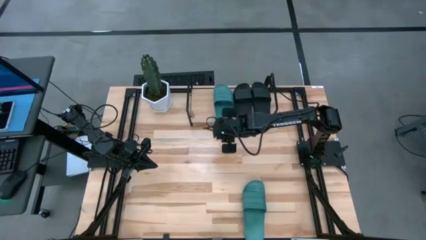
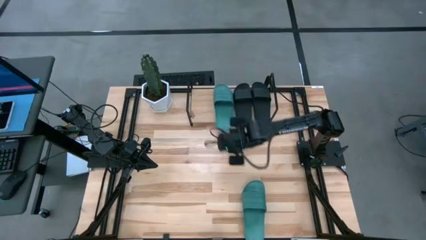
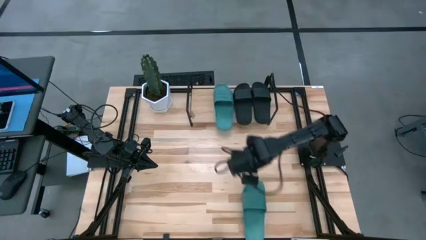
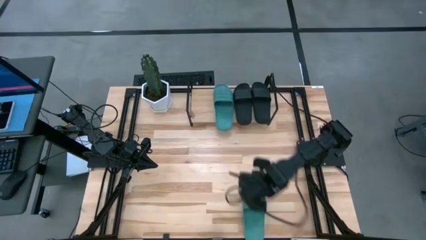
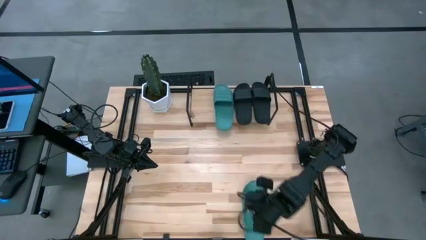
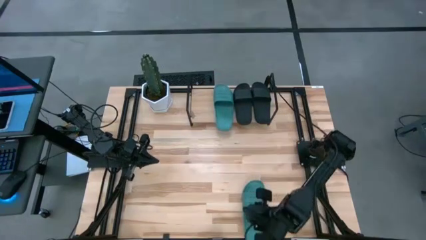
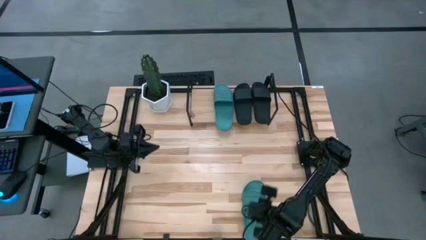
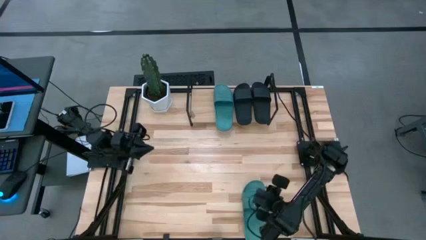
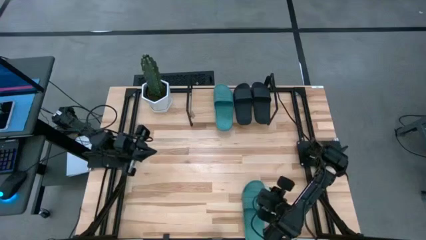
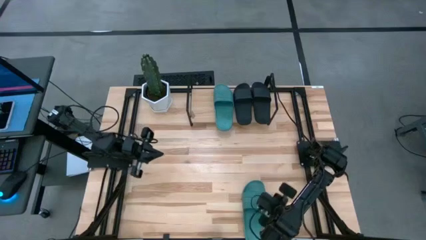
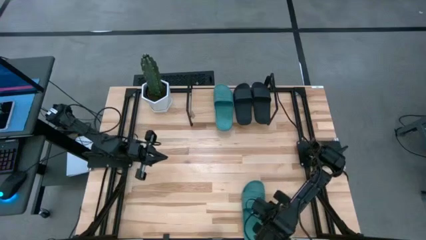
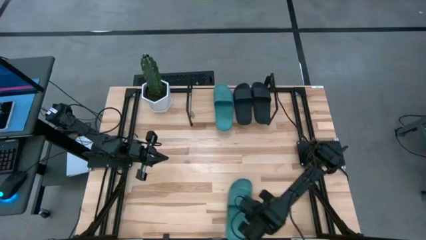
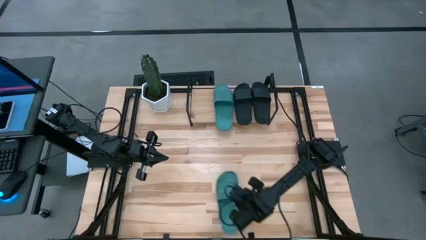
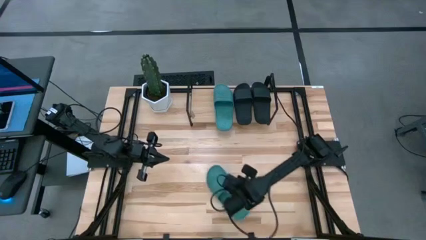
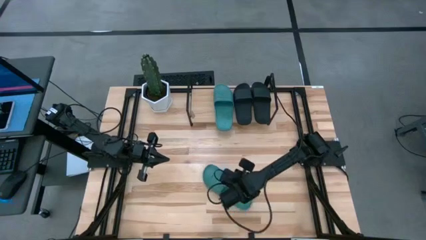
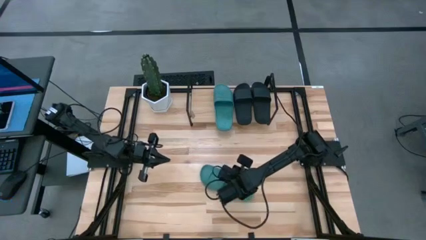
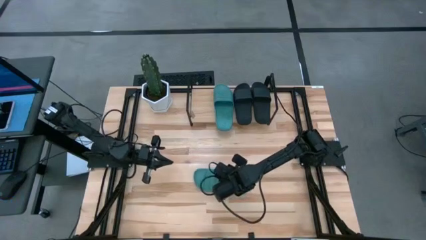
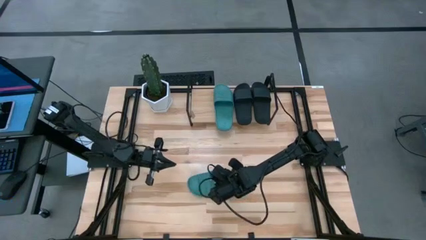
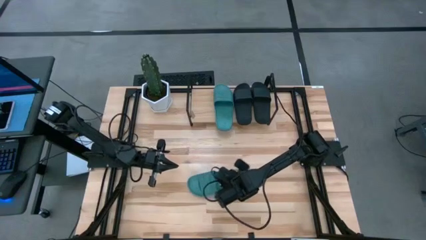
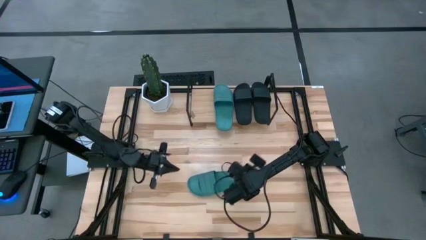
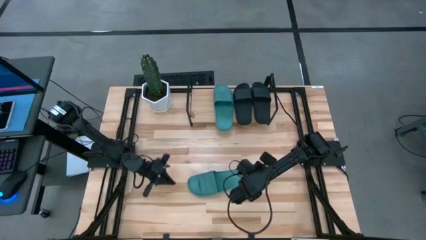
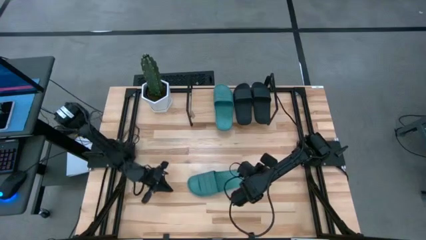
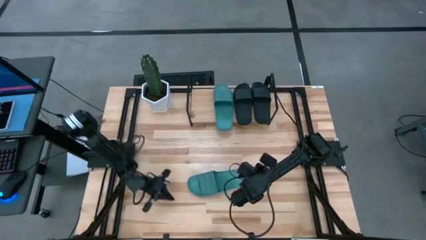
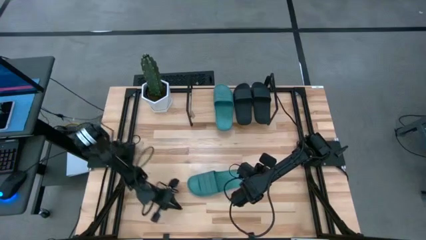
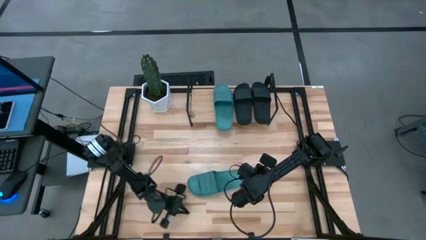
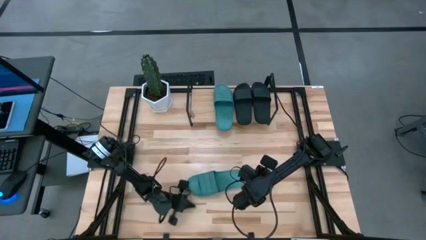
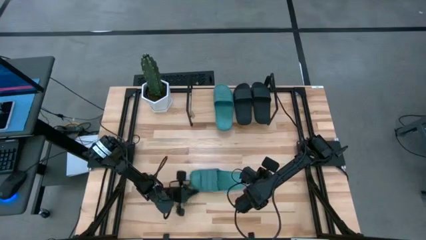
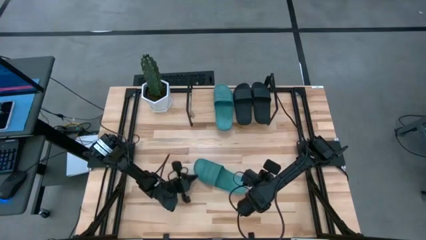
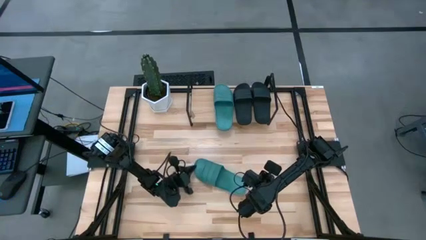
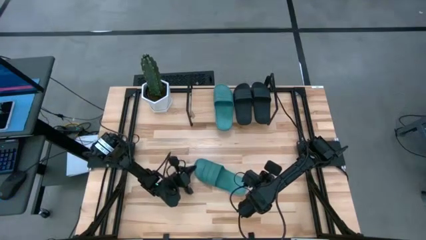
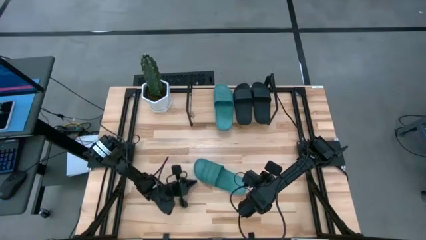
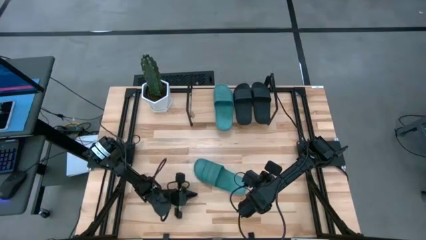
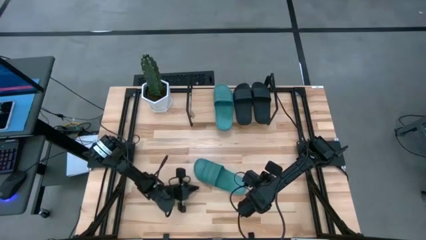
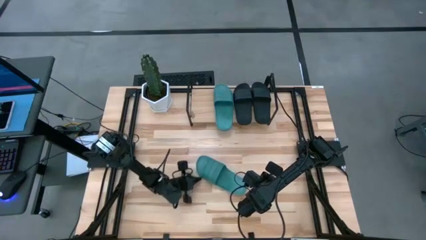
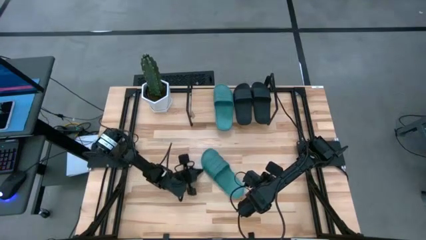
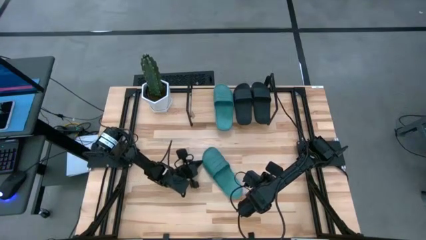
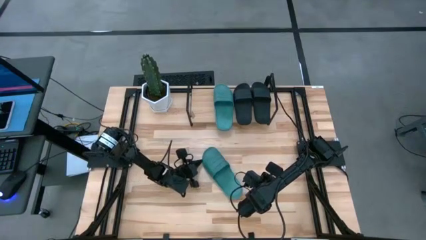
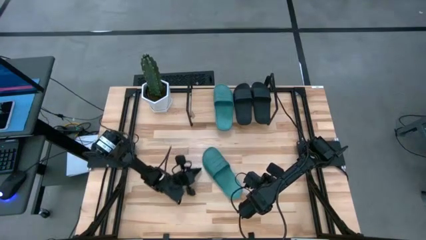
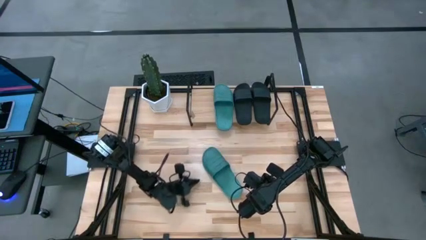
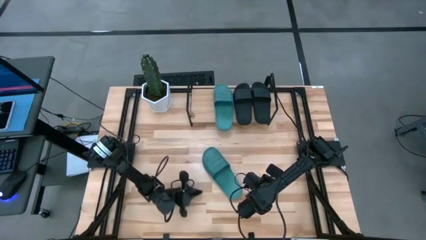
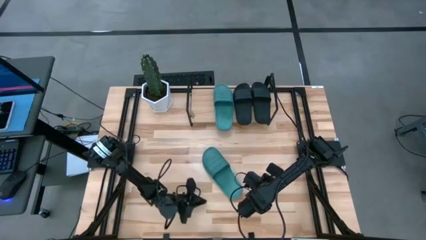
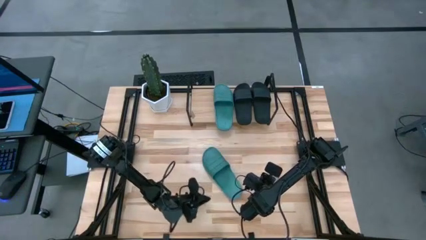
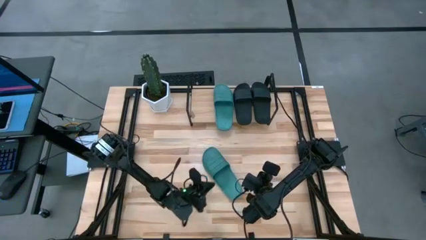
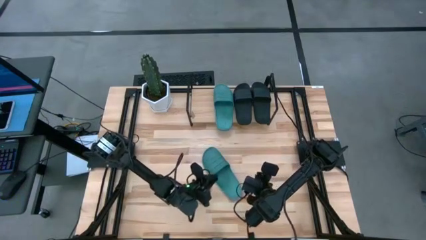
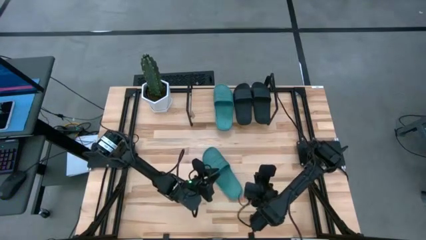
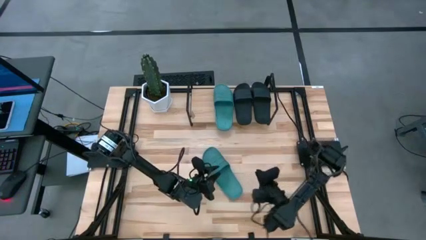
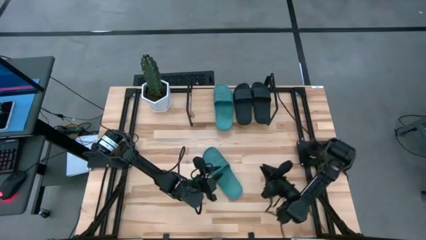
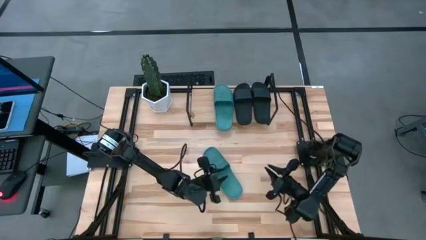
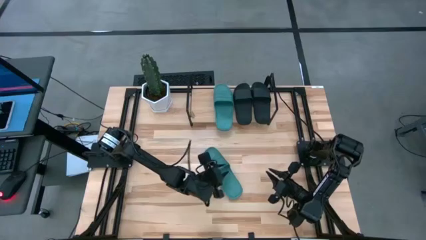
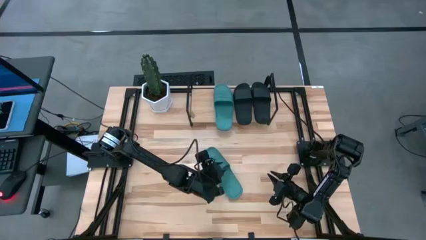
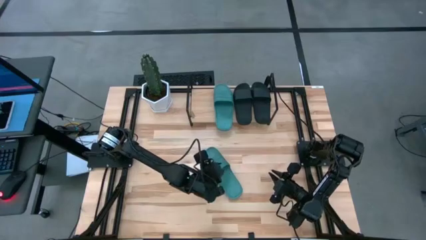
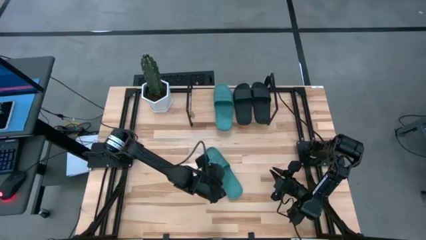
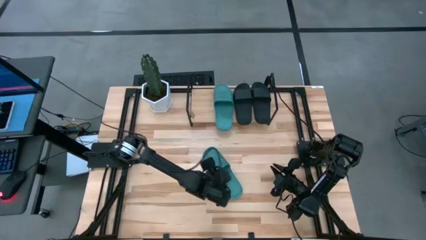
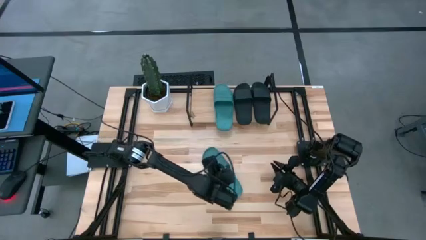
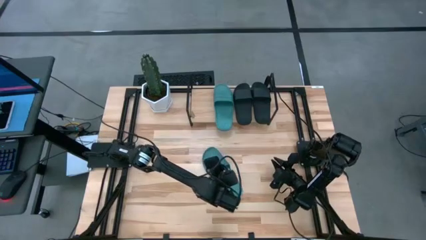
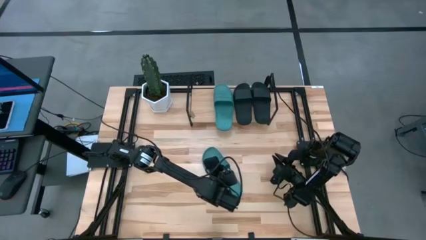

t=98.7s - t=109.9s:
Task: Pick and place slides into the shelf
Put the green slide on the shelf
